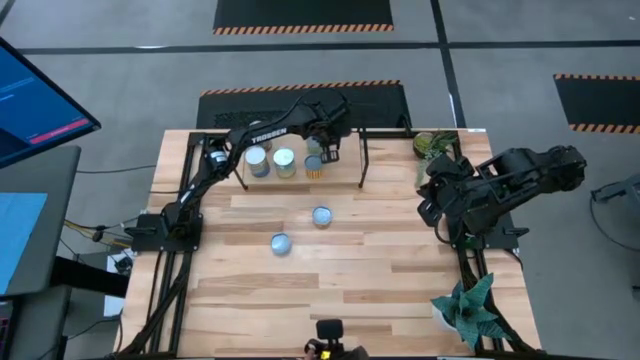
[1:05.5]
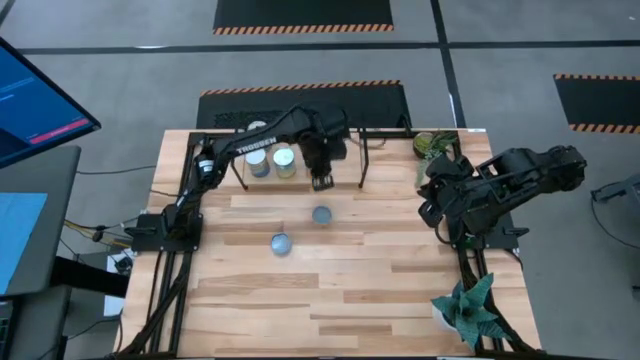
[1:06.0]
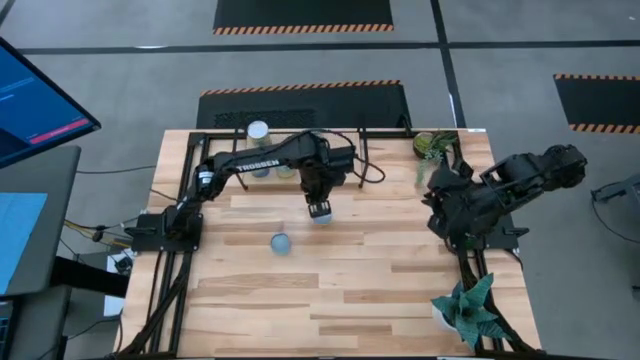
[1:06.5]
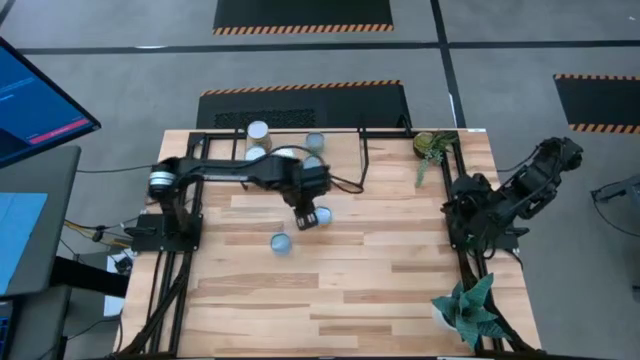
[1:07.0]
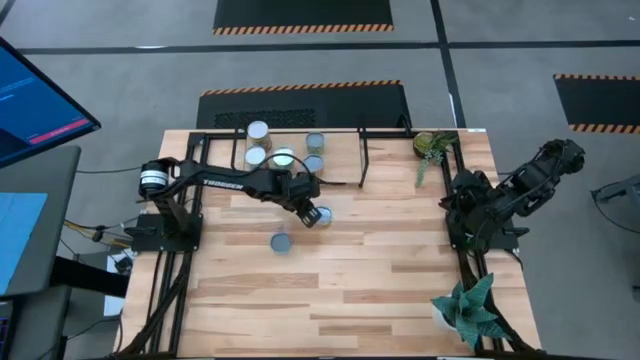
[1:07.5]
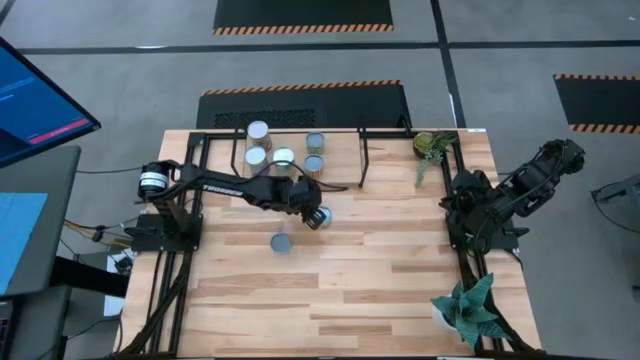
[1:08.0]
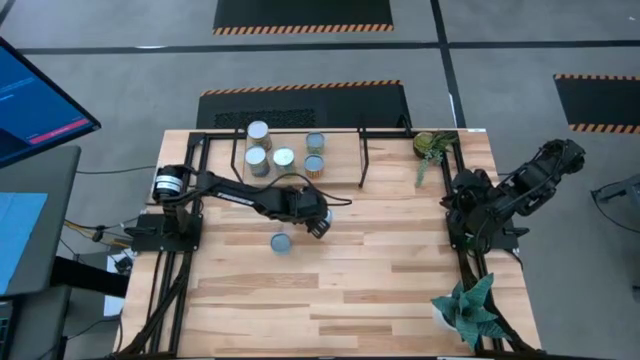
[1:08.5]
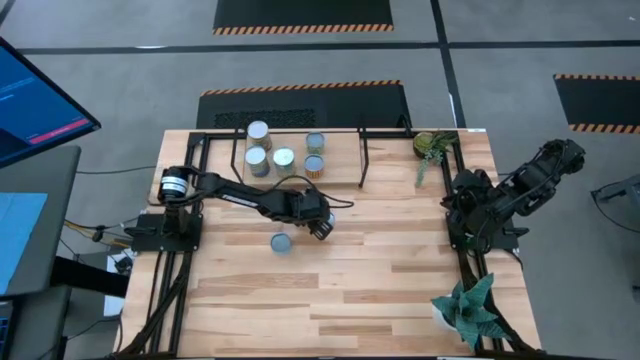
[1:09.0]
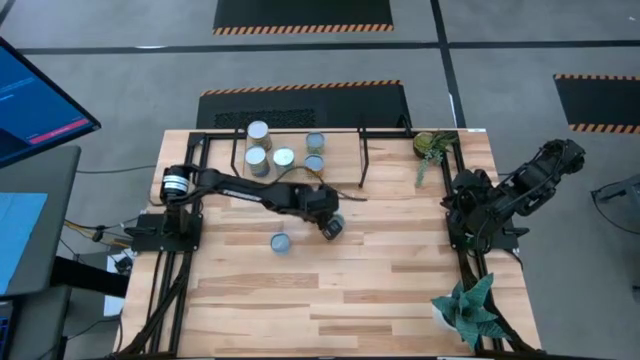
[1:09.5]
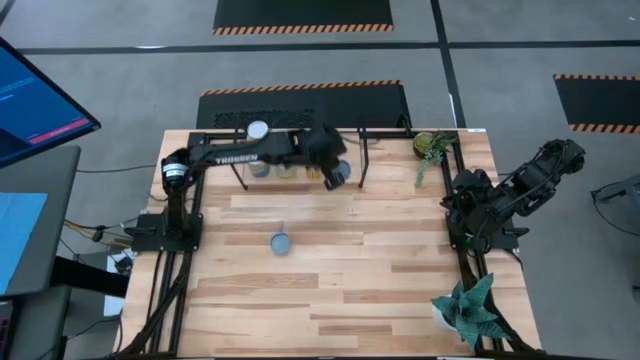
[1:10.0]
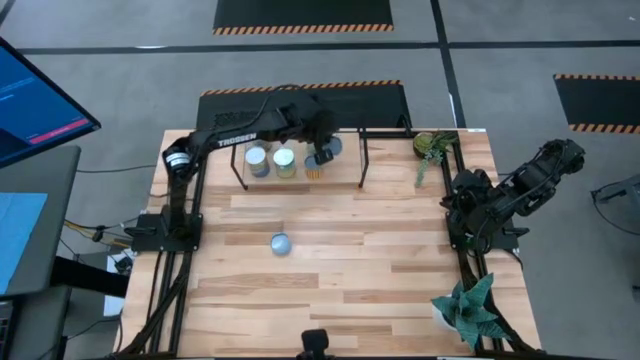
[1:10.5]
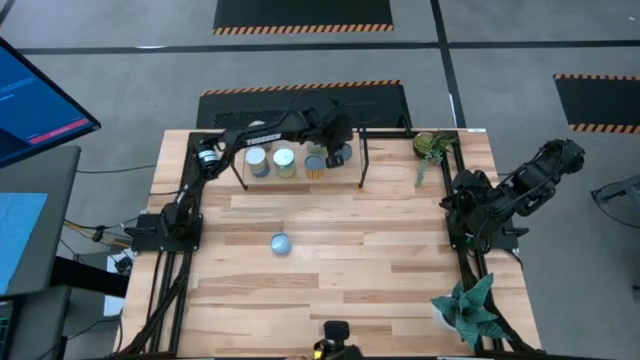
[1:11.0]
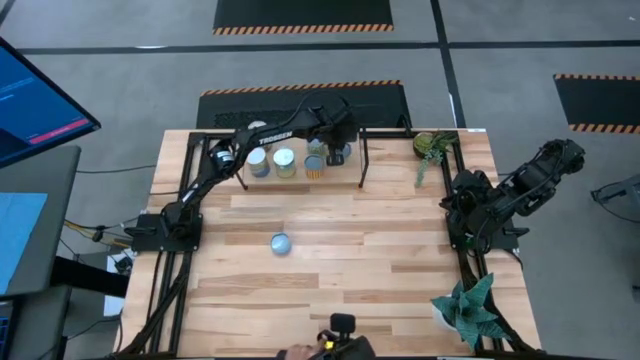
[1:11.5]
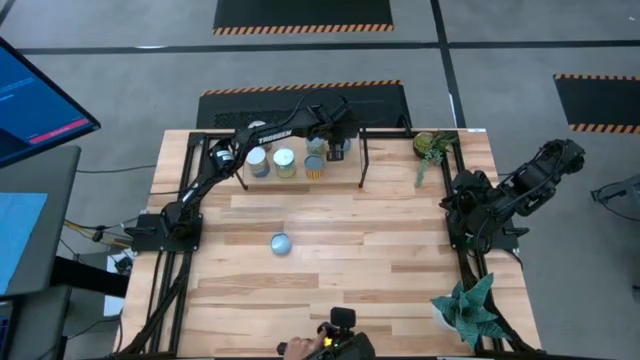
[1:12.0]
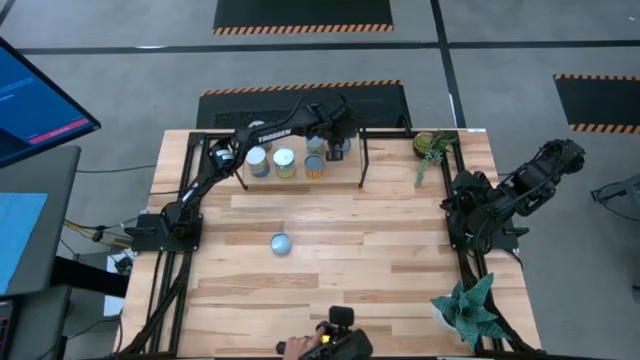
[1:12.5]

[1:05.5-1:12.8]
Task: Pick and place cans onto a shelf
Put the canned mushrooms on the shelf

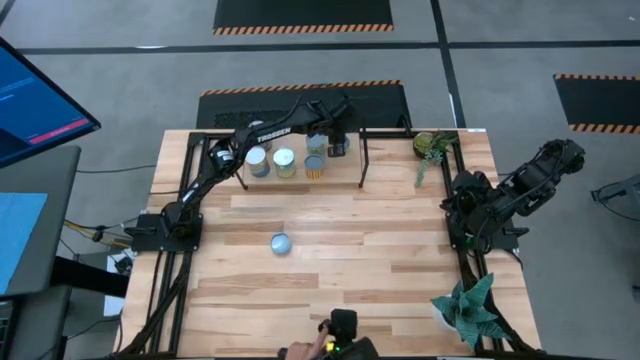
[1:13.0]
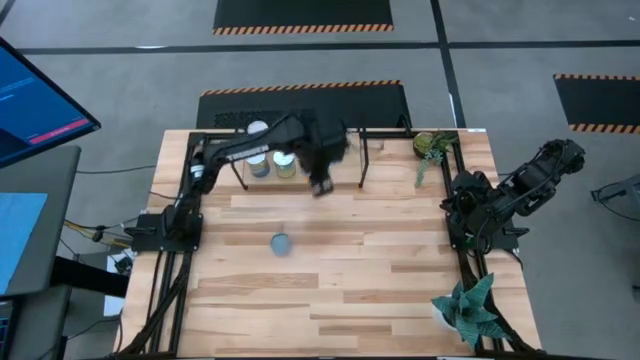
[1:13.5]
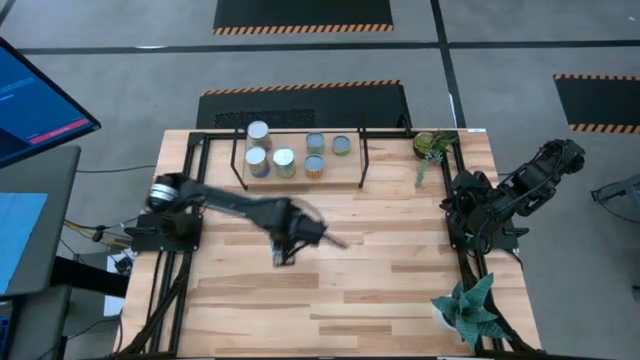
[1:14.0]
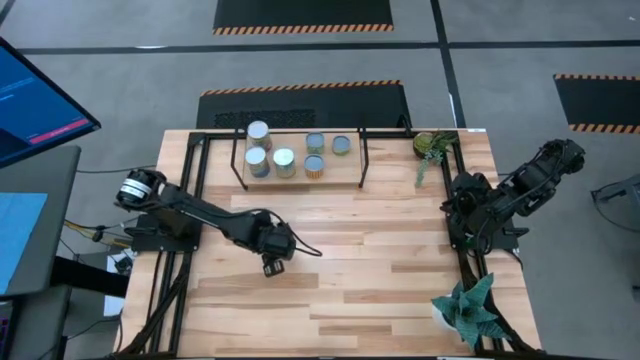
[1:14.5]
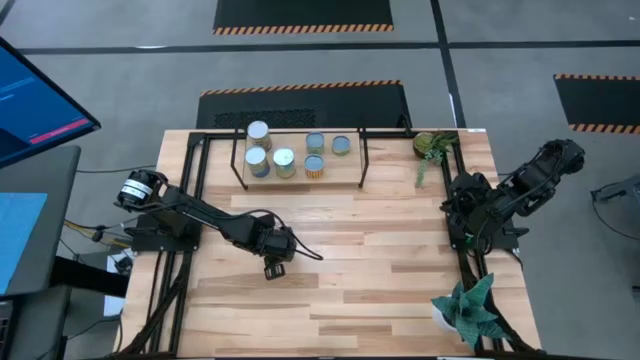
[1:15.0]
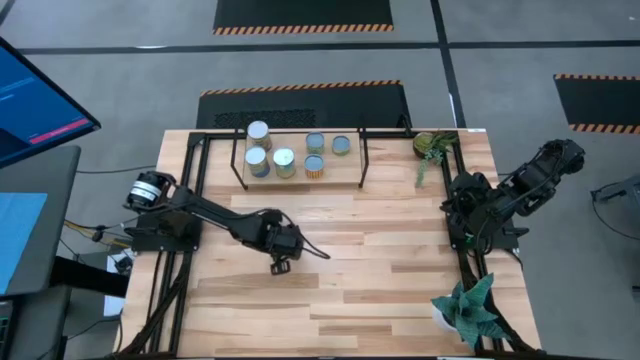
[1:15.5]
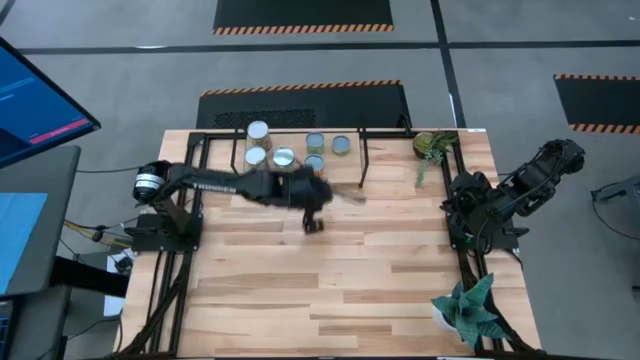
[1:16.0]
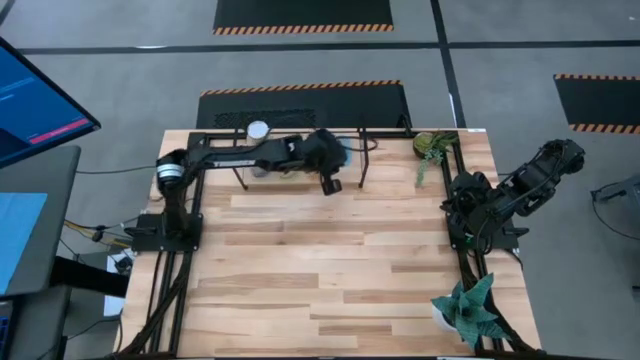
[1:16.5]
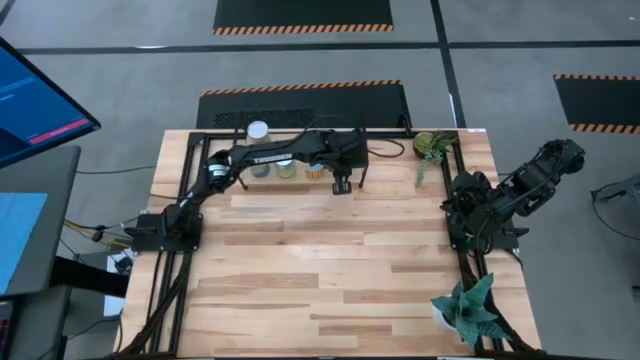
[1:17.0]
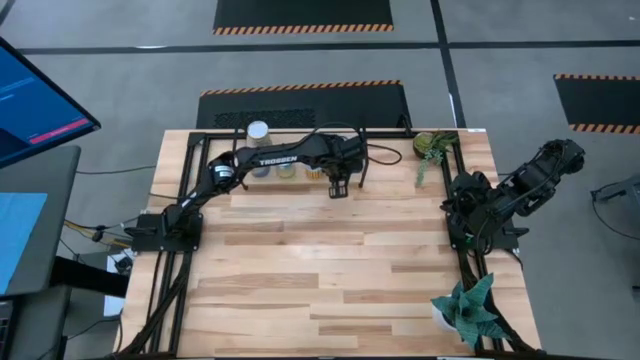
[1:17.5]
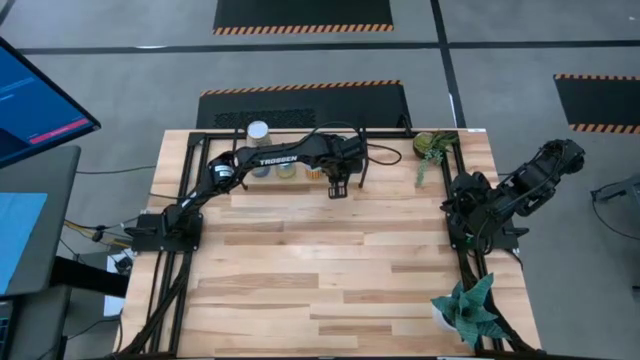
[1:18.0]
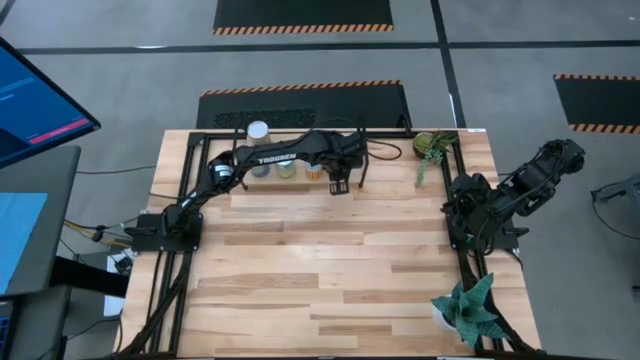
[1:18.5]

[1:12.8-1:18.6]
Put the canned salmon on the shelf

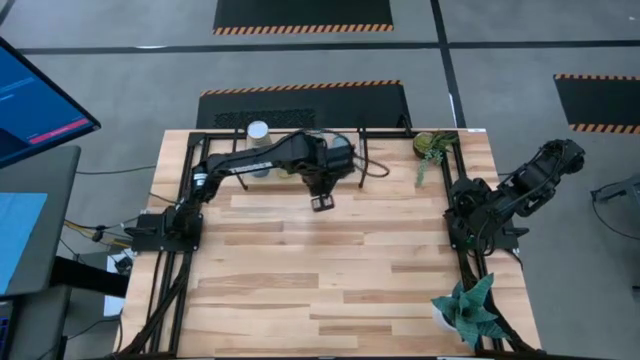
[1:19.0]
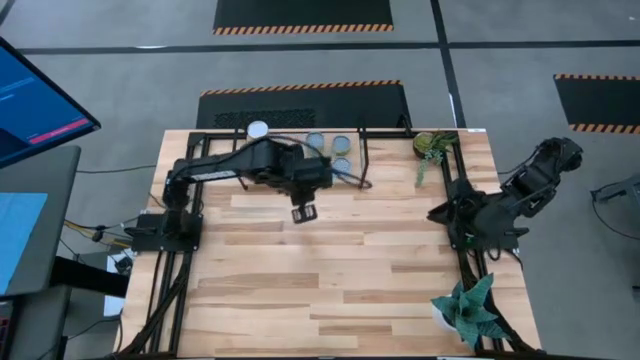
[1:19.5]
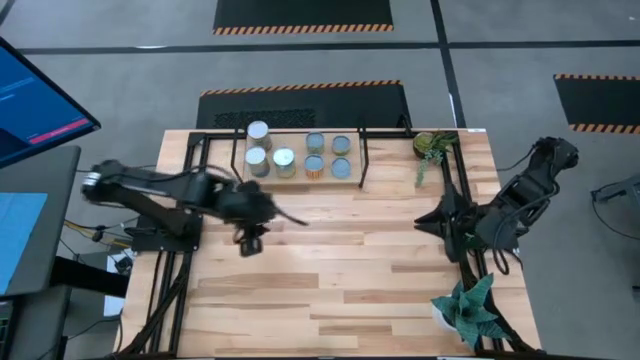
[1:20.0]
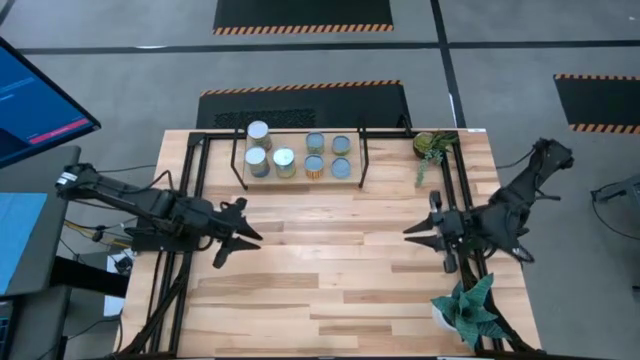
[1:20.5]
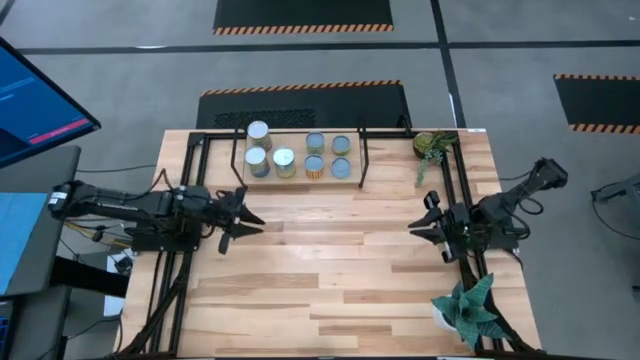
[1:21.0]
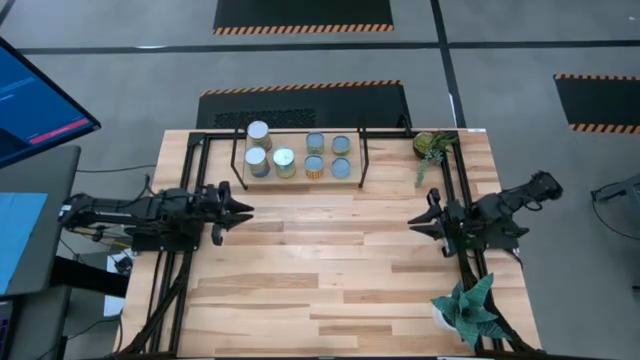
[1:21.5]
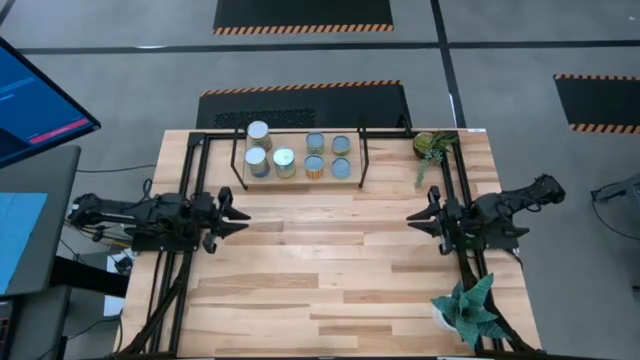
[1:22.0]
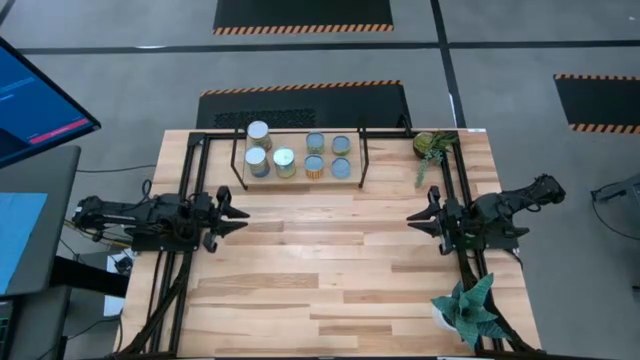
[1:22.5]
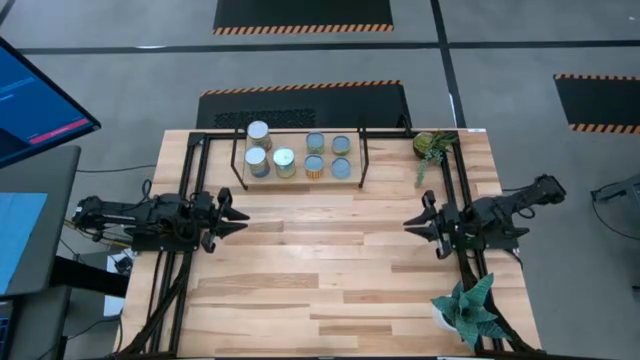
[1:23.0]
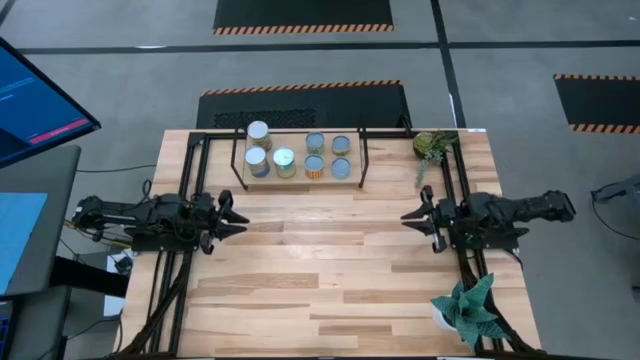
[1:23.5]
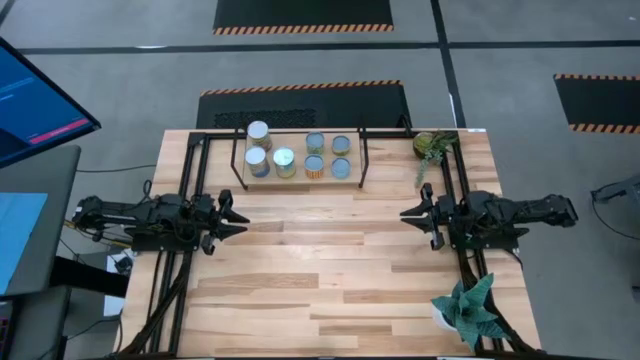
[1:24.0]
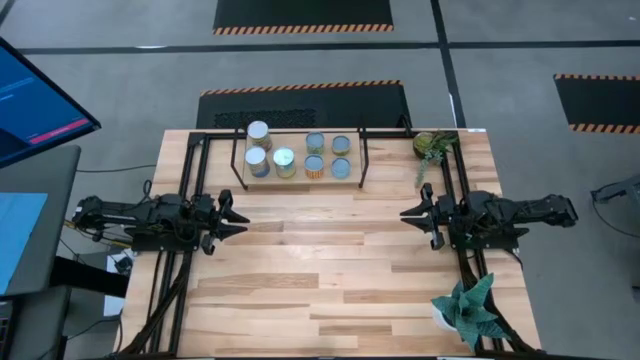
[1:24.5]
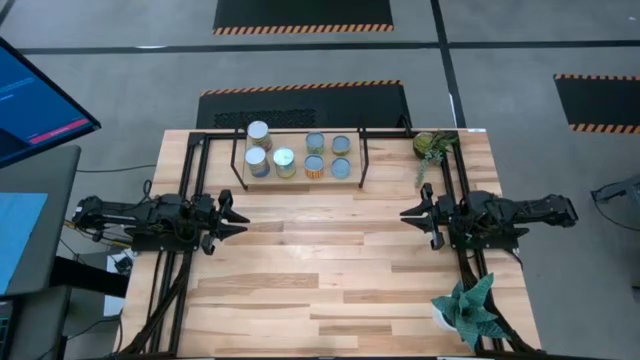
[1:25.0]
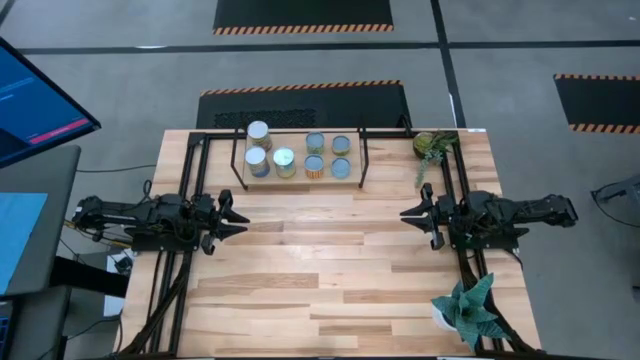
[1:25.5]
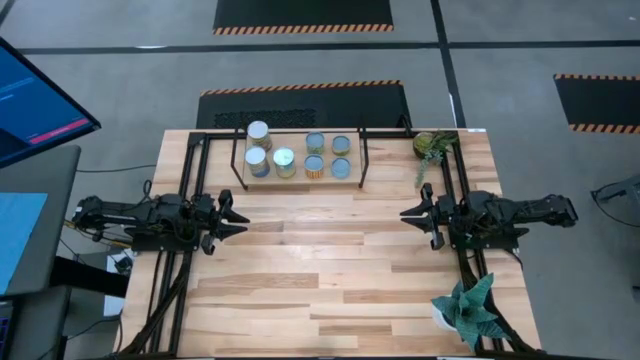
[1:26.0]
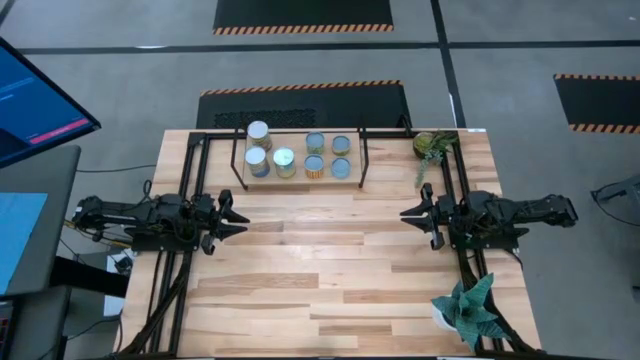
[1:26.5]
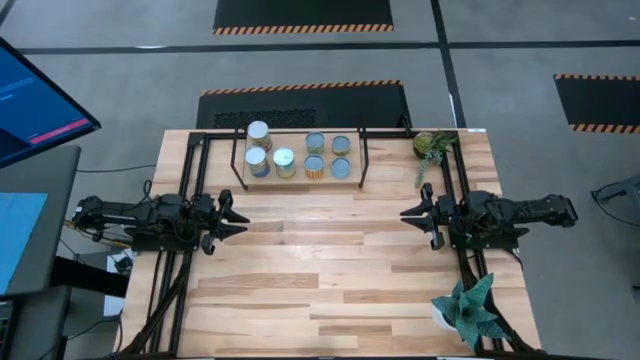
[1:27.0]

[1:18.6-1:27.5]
Return to Home Position
